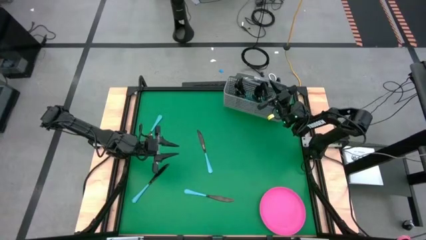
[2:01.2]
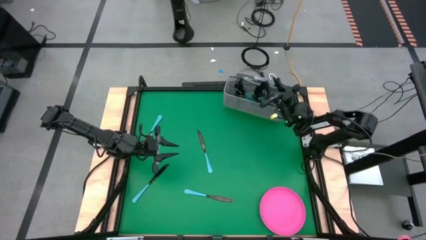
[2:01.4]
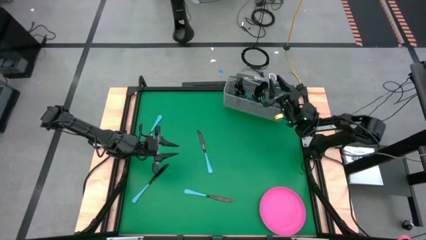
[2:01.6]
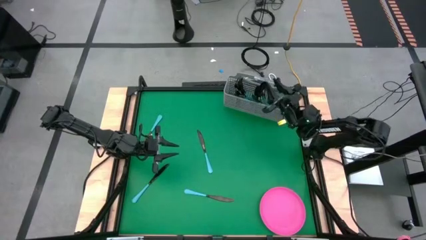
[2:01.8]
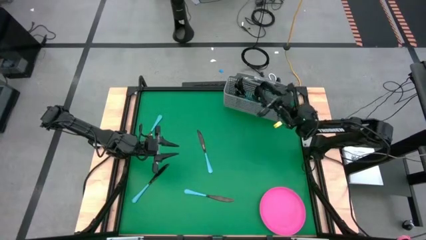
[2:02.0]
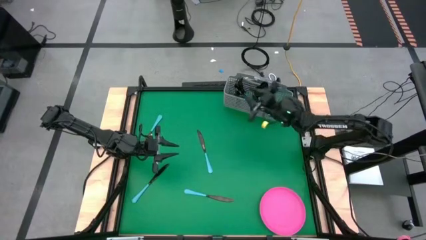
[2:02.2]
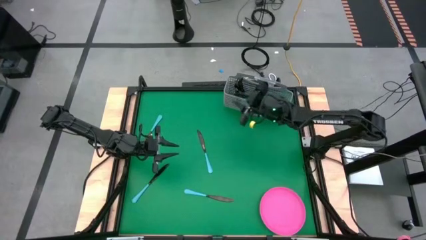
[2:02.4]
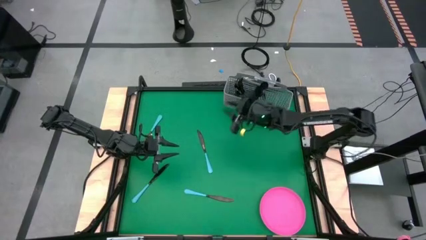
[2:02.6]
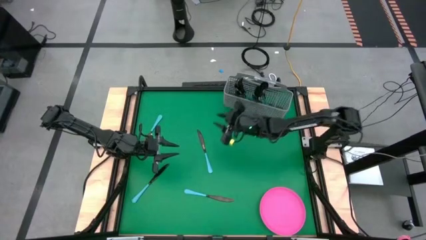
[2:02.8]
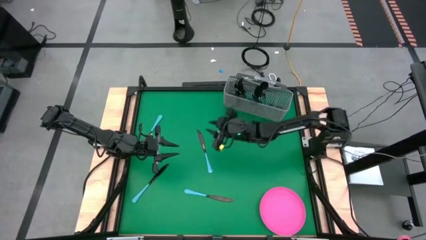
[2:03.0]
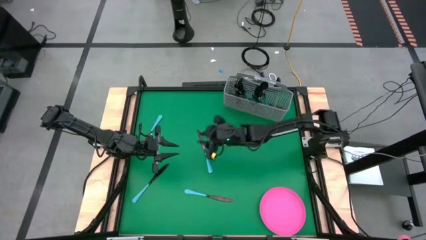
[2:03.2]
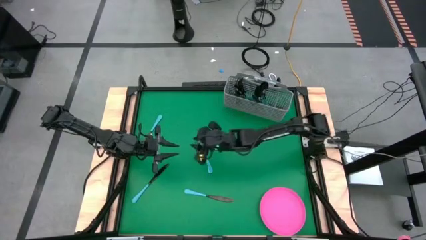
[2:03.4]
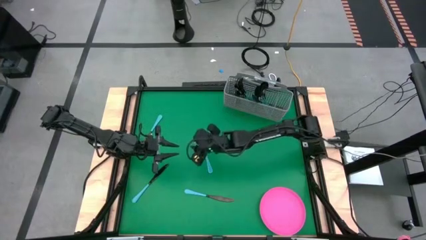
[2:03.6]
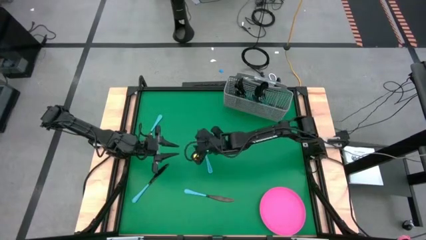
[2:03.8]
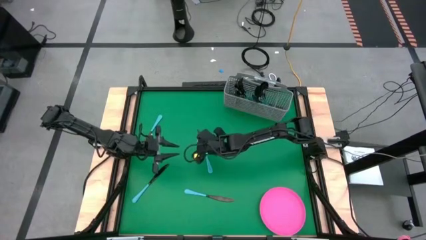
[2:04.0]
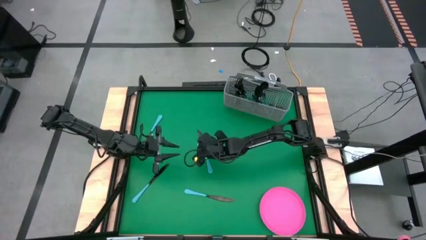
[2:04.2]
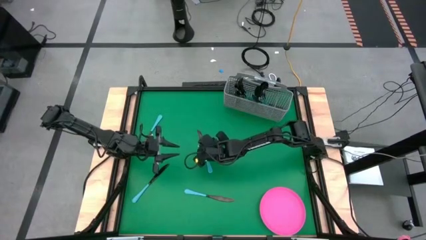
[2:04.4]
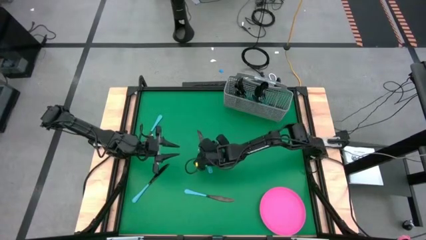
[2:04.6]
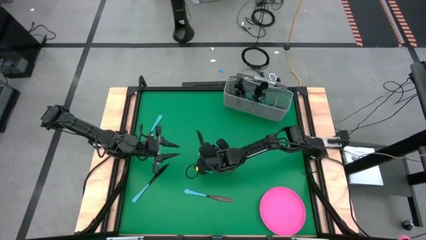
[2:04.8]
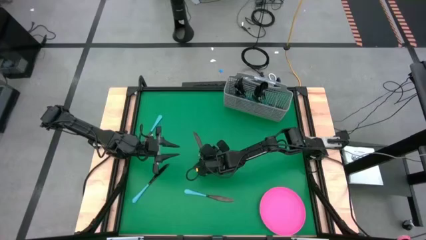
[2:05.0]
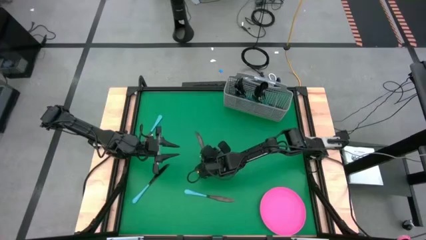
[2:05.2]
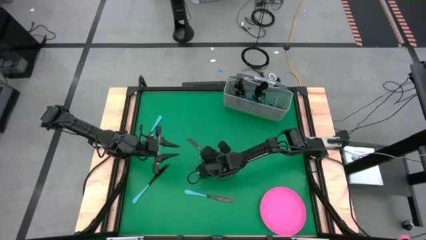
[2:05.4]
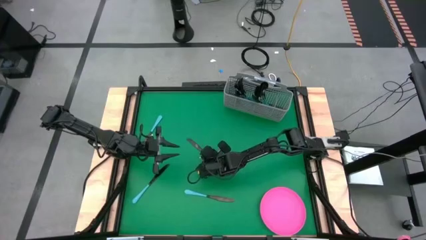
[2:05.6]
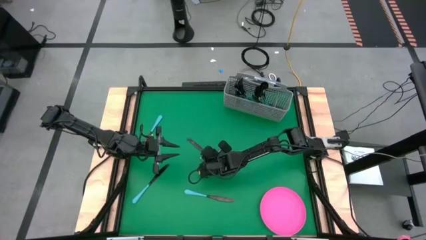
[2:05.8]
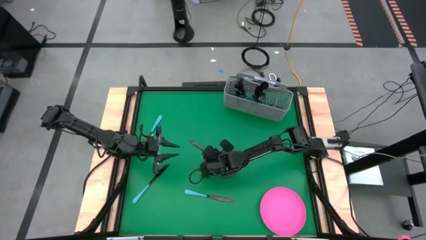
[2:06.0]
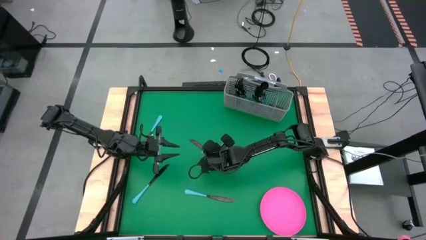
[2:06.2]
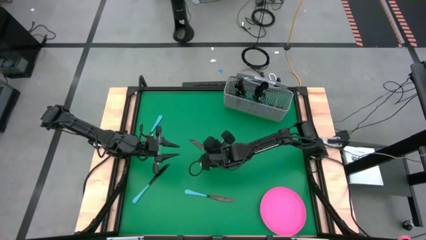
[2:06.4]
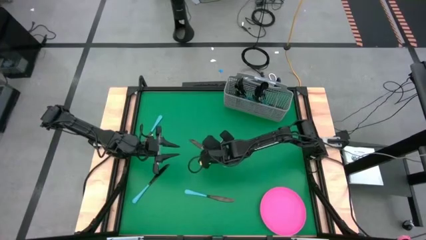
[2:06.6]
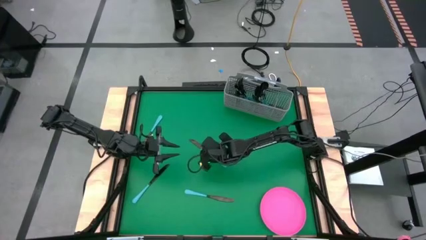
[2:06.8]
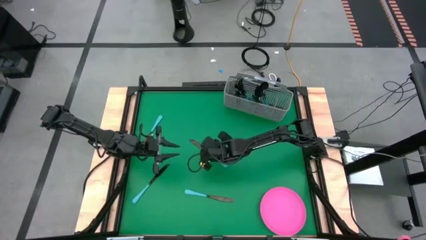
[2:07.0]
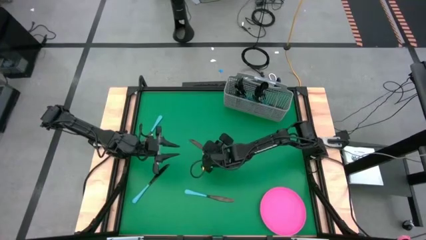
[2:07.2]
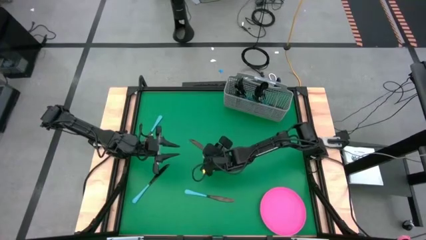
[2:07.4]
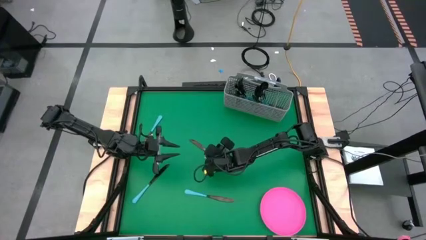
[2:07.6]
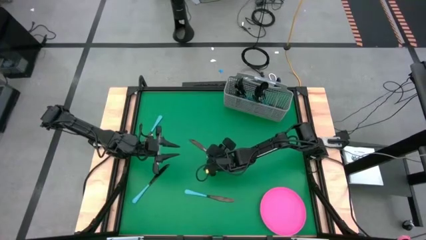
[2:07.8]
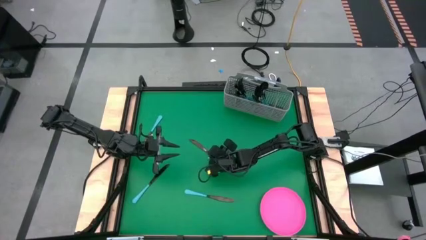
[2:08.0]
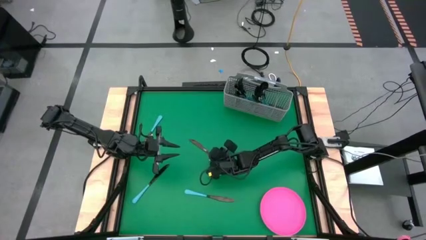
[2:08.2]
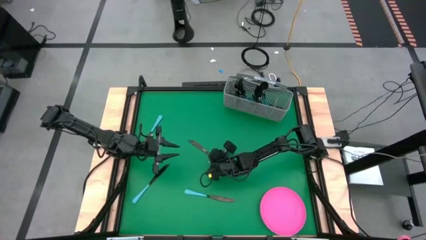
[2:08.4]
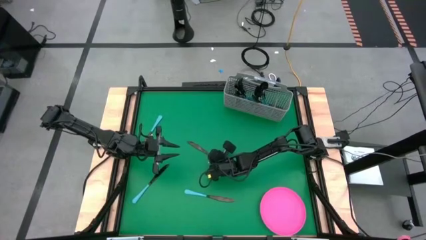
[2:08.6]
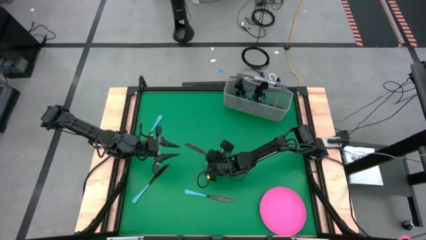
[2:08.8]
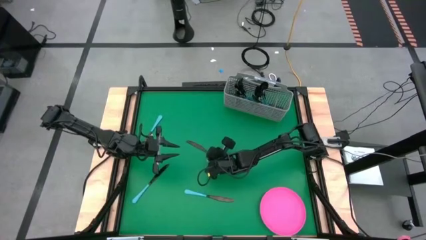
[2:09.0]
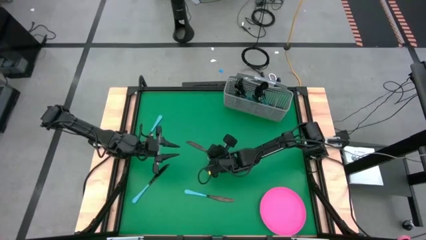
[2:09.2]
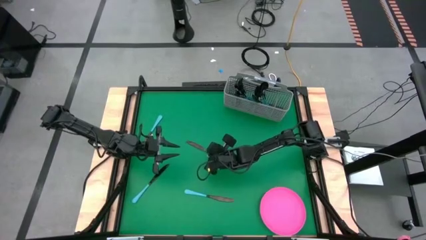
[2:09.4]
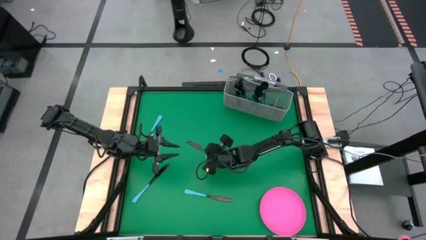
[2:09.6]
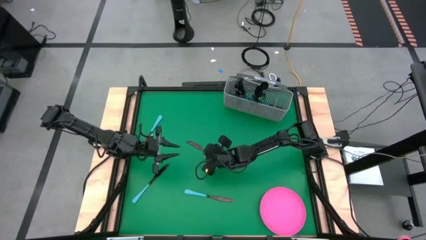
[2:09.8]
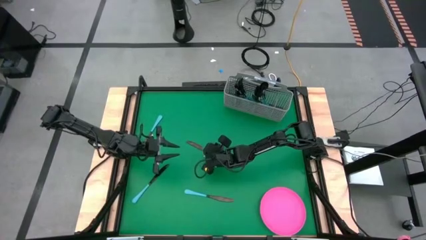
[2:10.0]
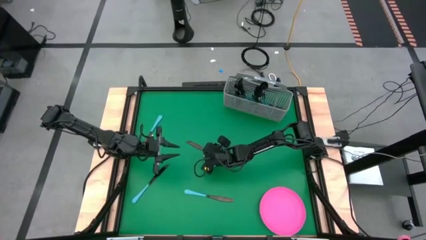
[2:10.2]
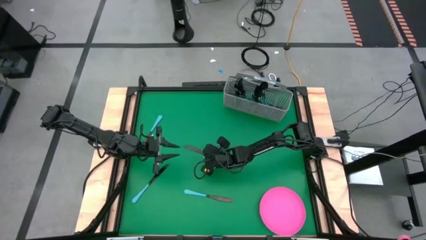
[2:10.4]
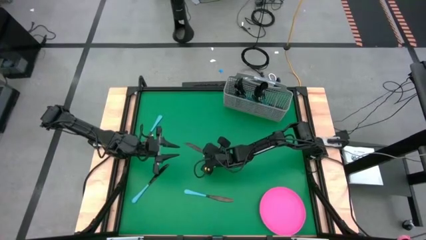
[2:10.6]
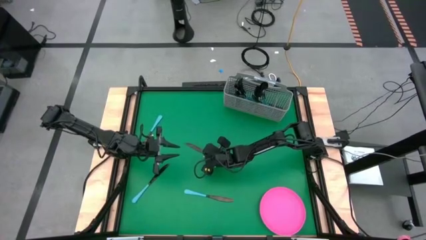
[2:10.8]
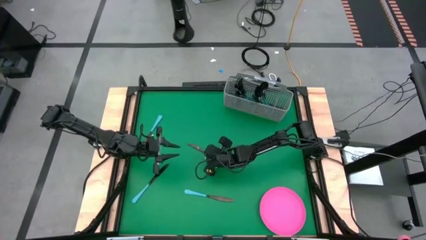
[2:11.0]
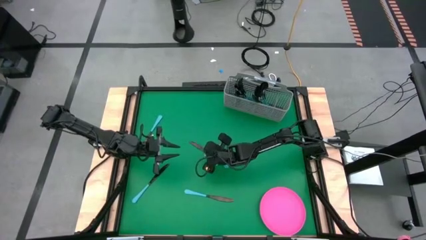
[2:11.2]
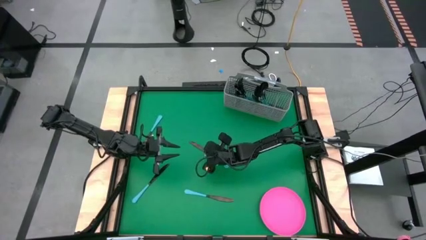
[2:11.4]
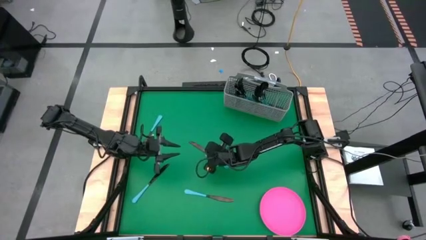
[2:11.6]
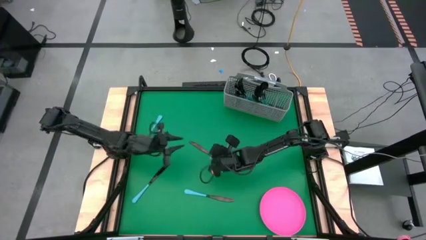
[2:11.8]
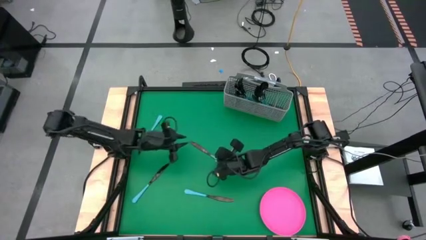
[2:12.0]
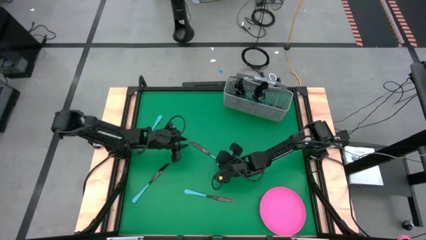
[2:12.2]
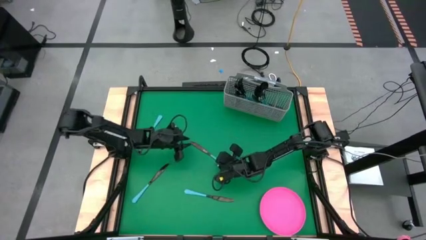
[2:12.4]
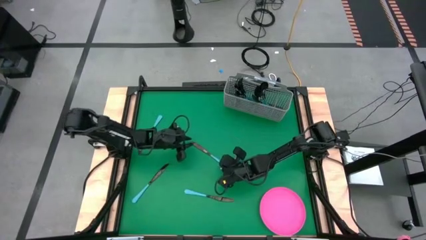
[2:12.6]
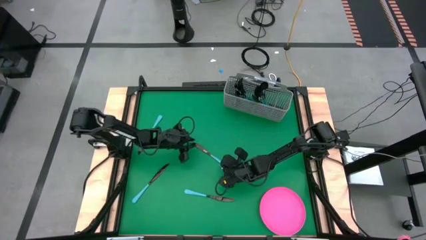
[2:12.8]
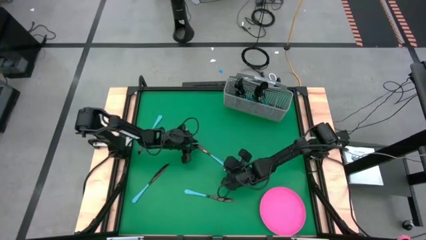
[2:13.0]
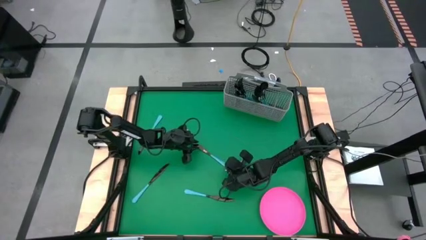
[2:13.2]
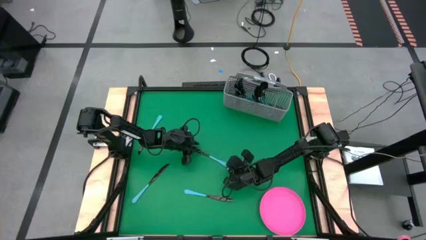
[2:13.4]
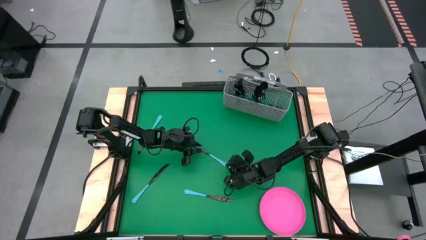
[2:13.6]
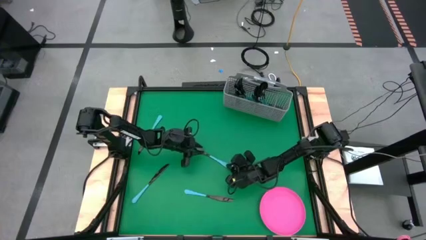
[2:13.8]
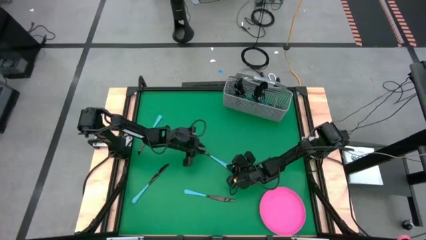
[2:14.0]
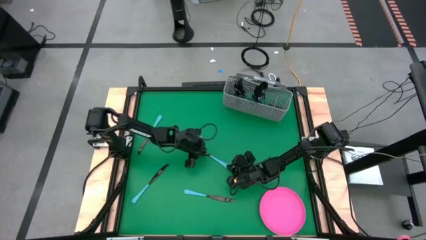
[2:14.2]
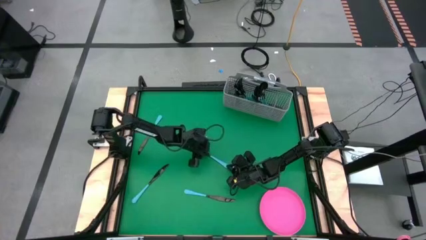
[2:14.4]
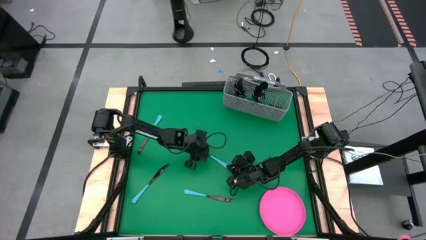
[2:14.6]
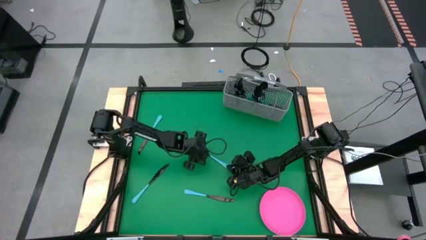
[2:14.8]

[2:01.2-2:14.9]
Task: Sort silverware
Put the blue table knife into the silverware basket

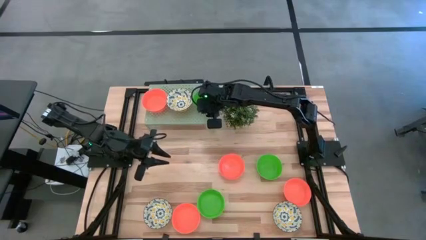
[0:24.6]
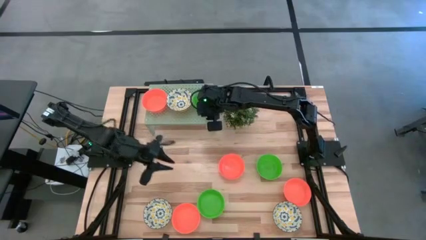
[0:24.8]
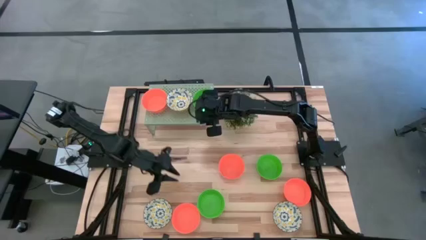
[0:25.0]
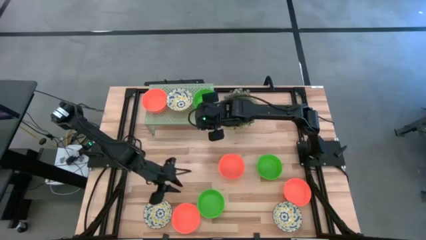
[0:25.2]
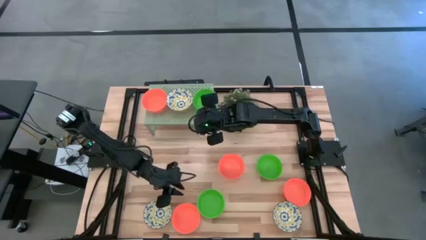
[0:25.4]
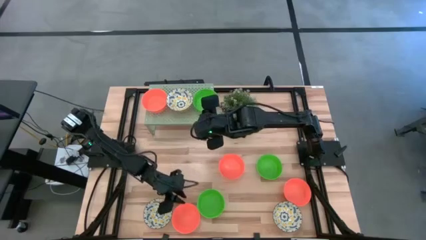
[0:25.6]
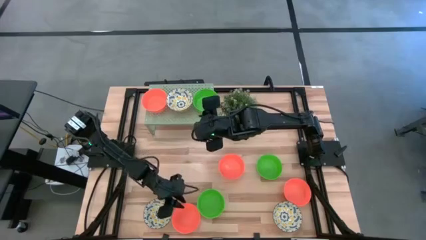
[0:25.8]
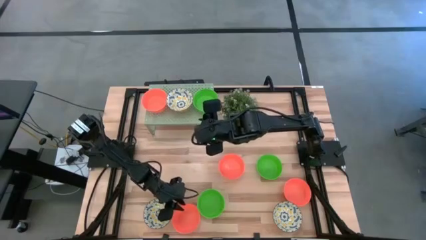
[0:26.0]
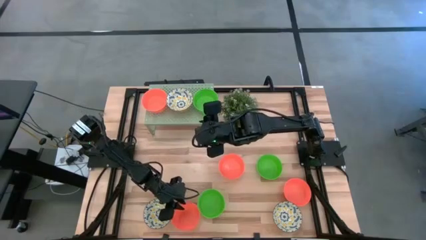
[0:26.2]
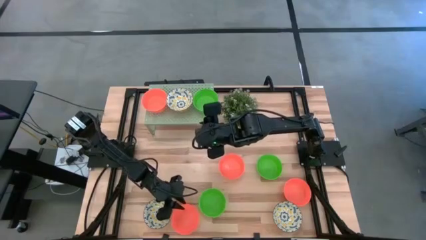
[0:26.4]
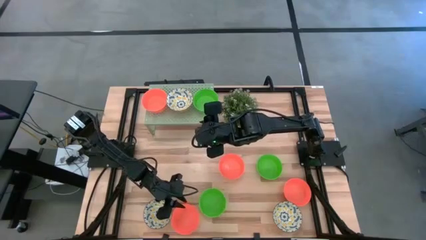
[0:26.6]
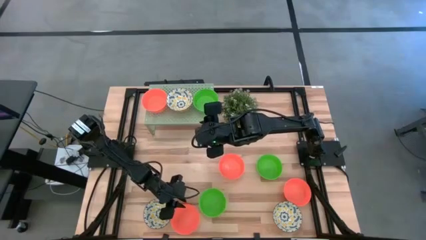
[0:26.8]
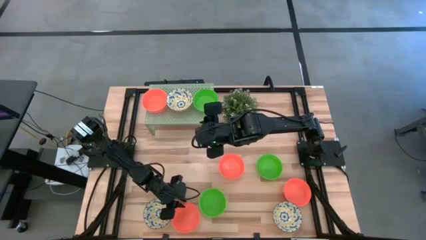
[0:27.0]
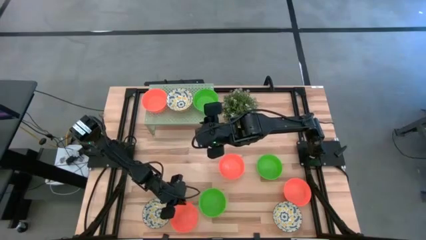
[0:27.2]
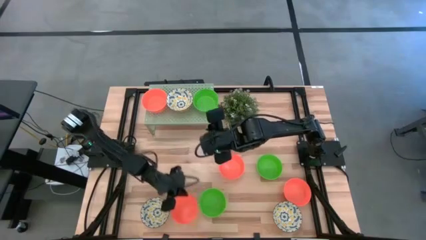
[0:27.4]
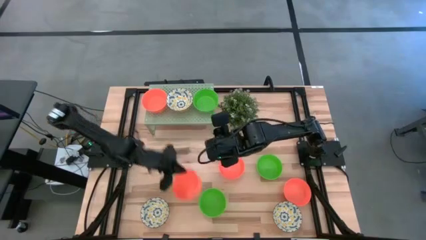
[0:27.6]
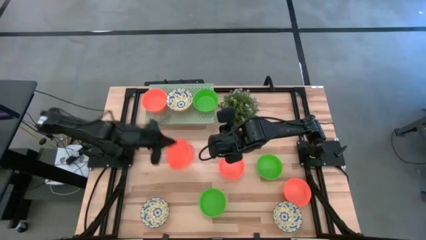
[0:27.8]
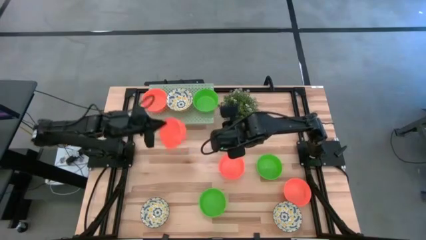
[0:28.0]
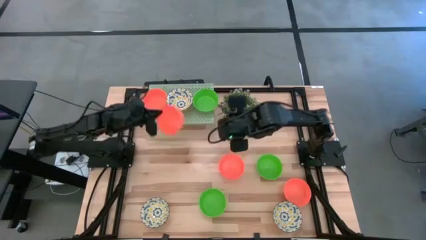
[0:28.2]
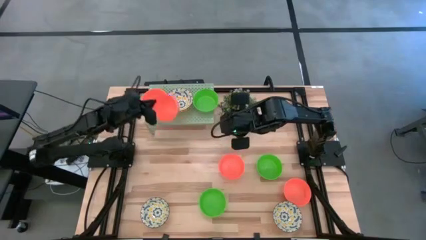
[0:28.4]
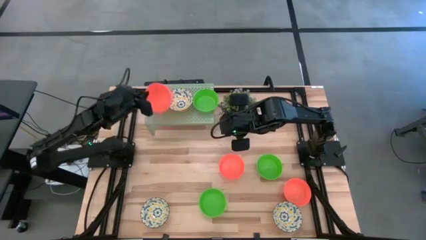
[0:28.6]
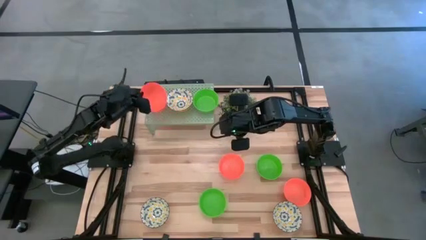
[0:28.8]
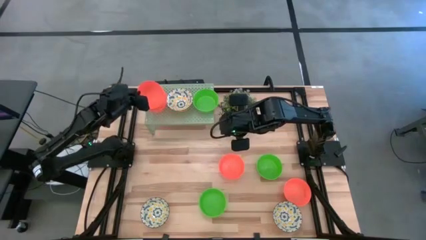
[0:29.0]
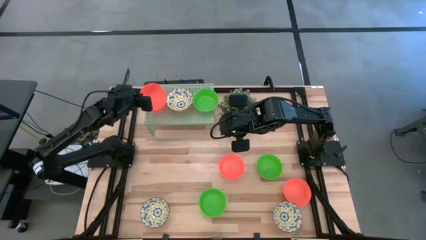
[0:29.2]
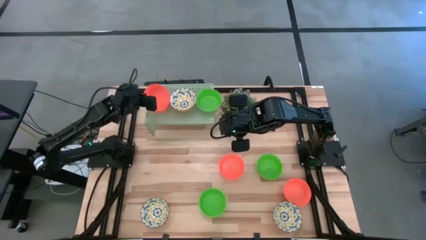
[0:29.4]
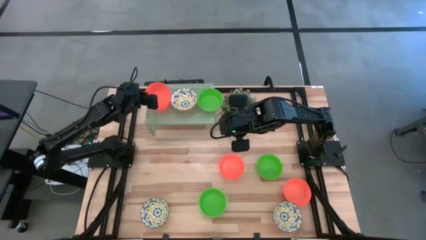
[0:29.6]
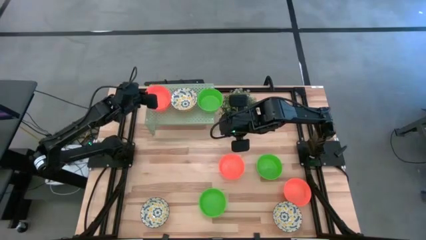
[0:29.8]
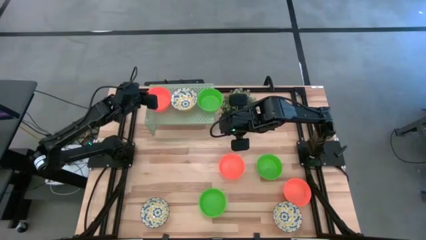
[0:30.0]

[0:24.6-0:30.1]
Task: Pick & Place Mini bowls
Stack the orange bowl on top of the orange bowl on the shelf
